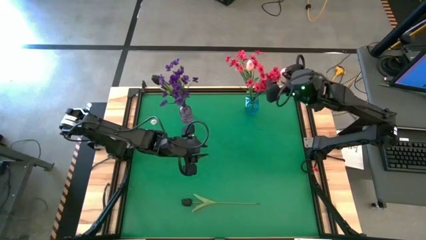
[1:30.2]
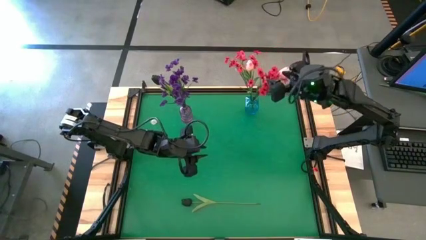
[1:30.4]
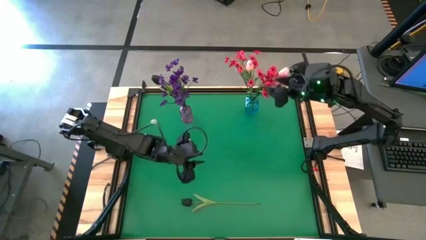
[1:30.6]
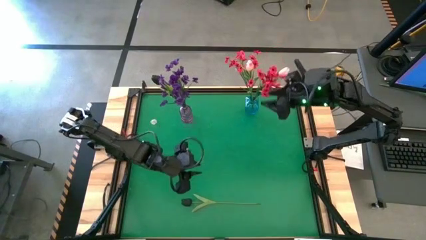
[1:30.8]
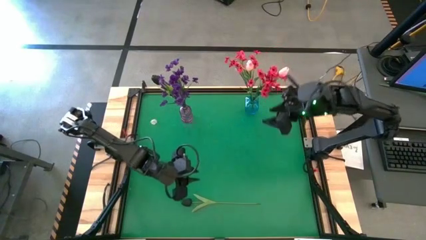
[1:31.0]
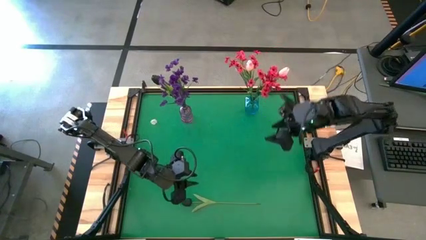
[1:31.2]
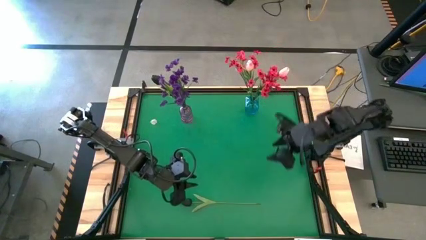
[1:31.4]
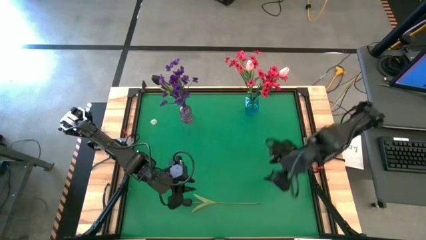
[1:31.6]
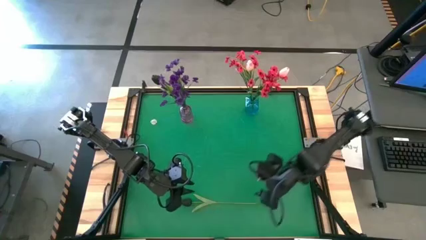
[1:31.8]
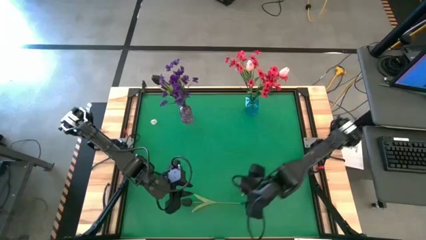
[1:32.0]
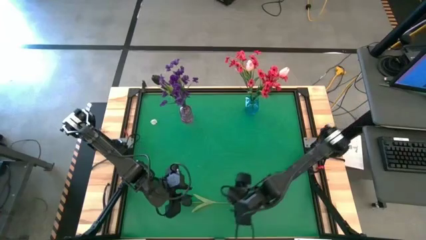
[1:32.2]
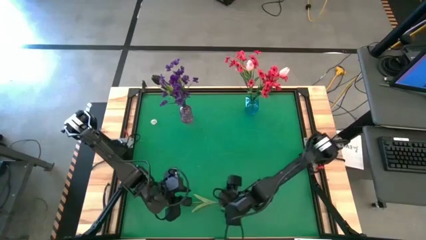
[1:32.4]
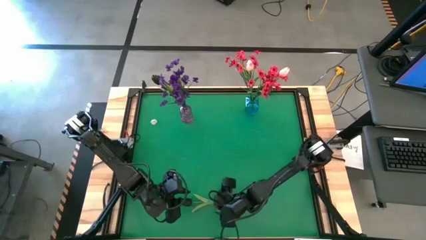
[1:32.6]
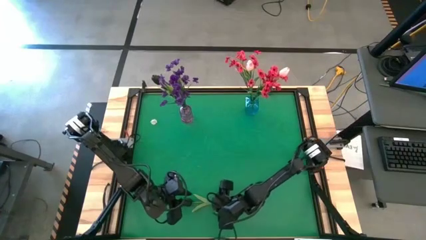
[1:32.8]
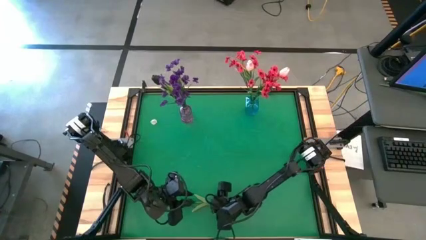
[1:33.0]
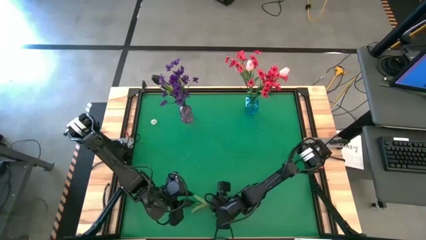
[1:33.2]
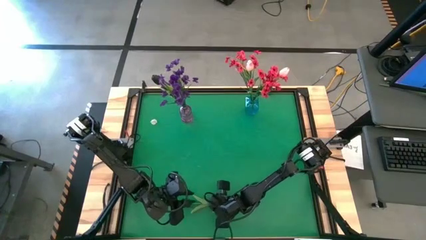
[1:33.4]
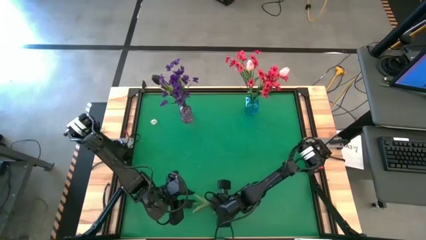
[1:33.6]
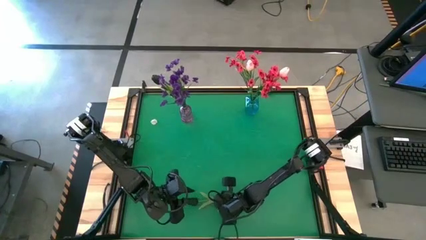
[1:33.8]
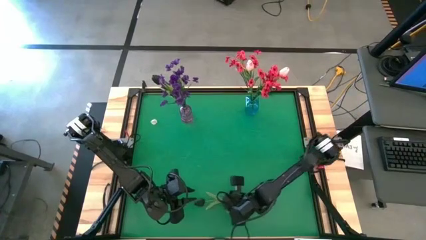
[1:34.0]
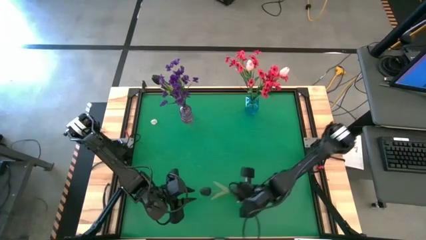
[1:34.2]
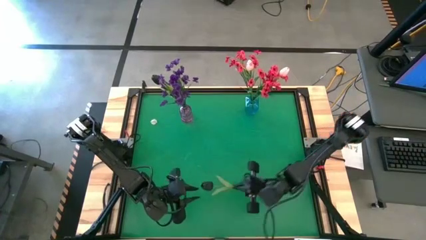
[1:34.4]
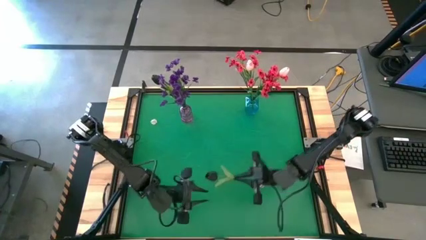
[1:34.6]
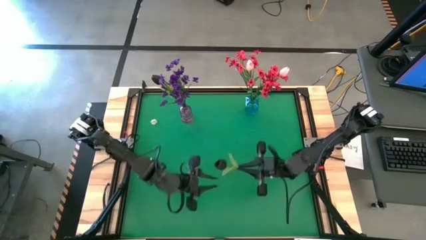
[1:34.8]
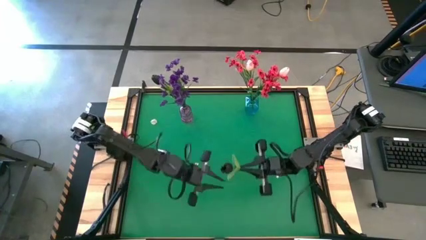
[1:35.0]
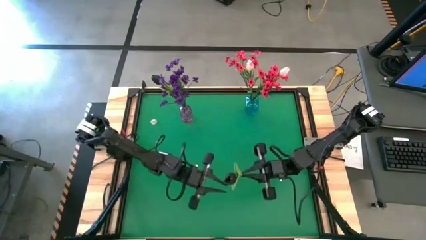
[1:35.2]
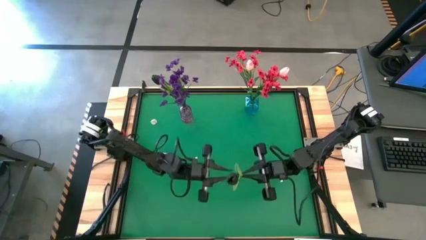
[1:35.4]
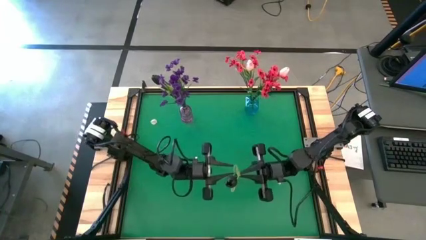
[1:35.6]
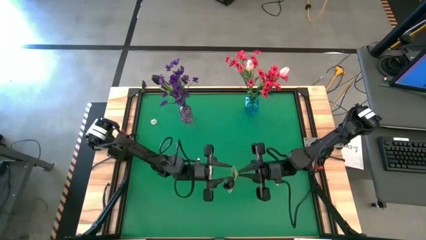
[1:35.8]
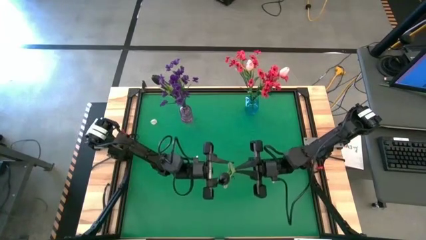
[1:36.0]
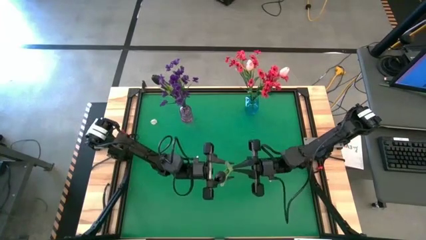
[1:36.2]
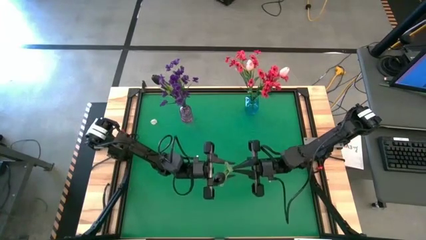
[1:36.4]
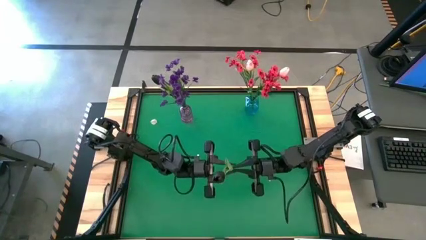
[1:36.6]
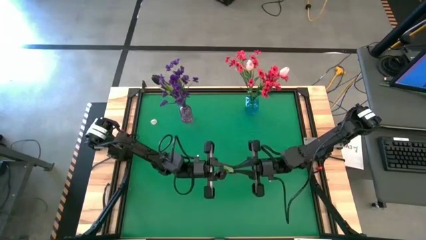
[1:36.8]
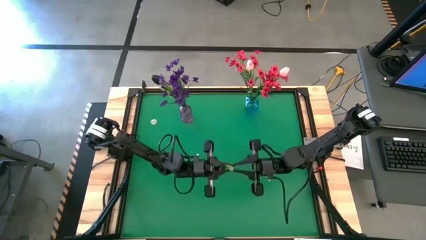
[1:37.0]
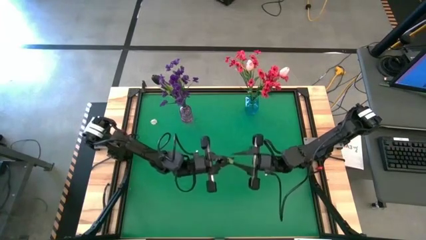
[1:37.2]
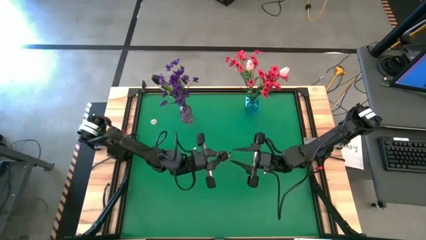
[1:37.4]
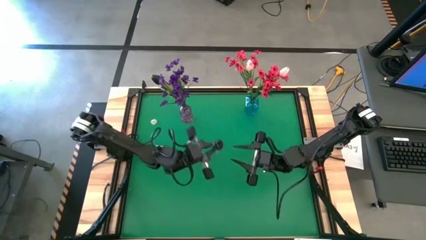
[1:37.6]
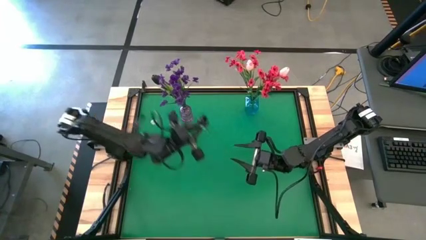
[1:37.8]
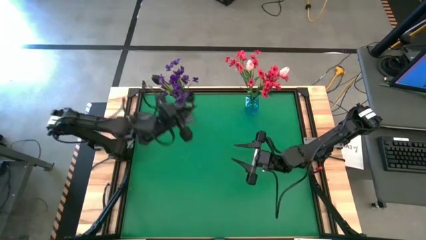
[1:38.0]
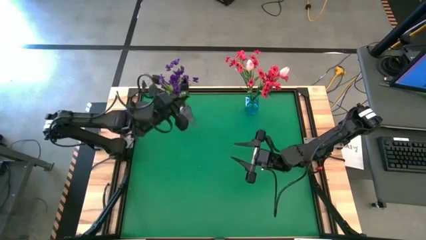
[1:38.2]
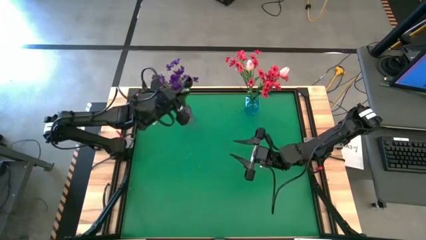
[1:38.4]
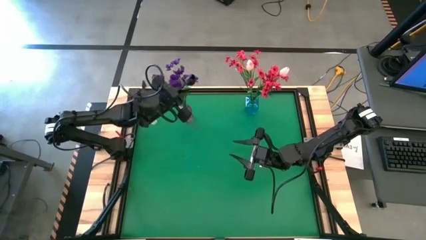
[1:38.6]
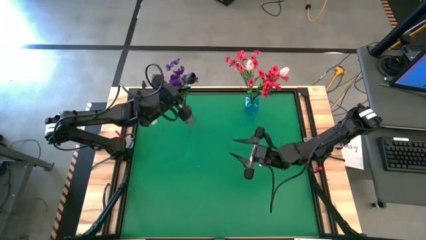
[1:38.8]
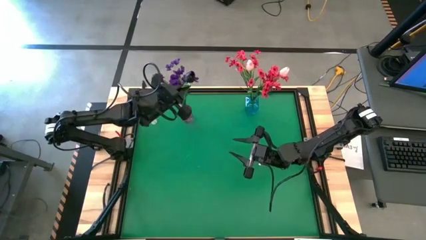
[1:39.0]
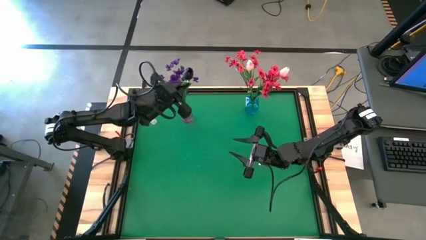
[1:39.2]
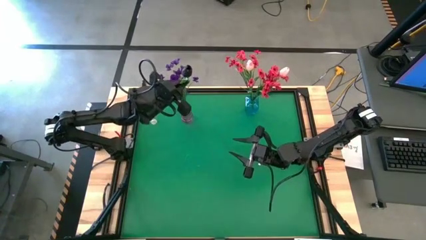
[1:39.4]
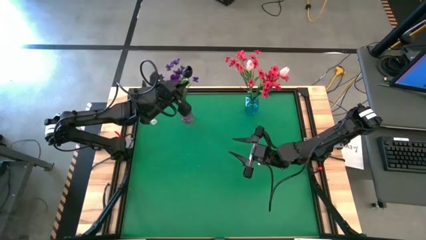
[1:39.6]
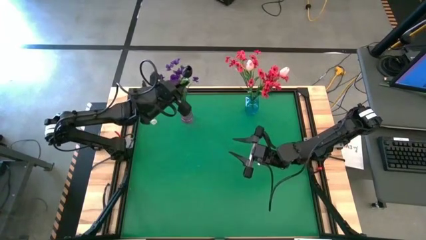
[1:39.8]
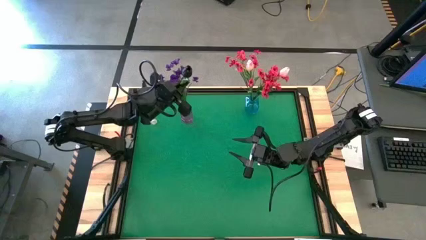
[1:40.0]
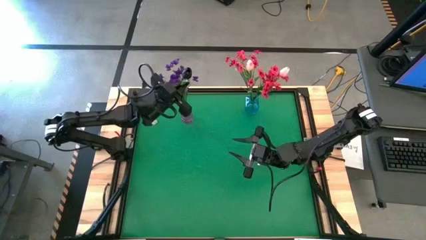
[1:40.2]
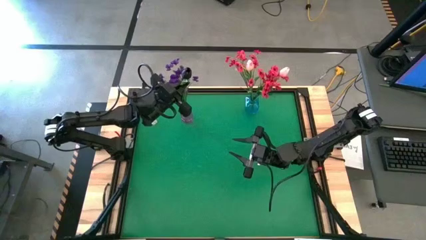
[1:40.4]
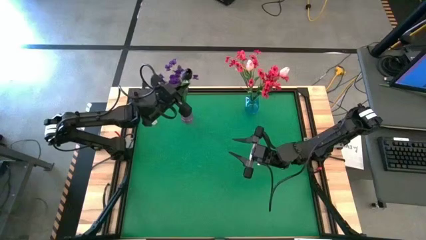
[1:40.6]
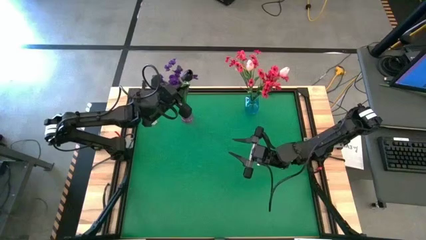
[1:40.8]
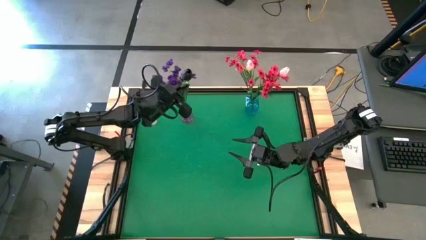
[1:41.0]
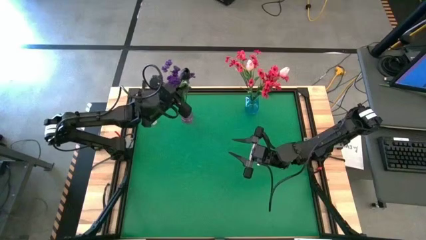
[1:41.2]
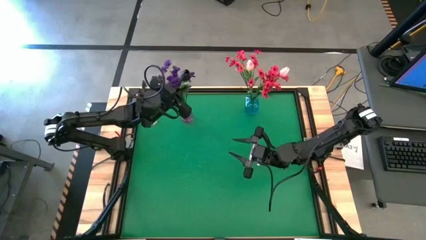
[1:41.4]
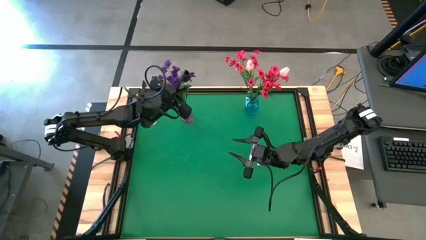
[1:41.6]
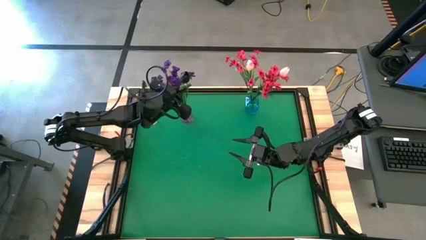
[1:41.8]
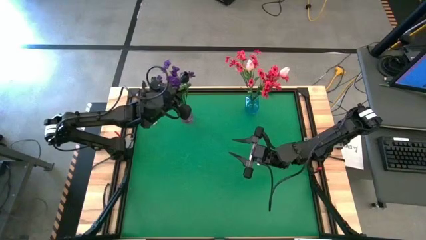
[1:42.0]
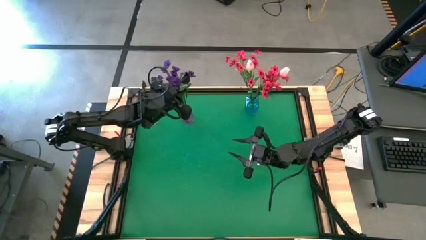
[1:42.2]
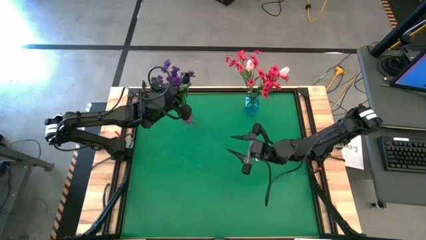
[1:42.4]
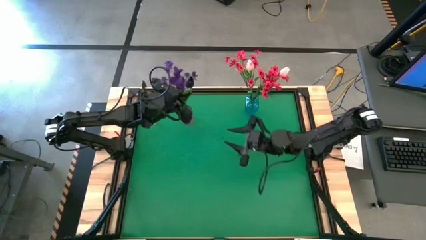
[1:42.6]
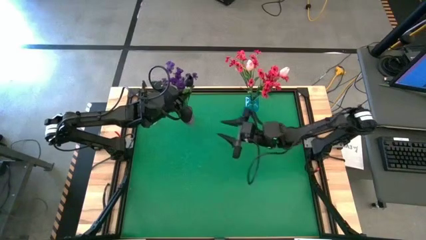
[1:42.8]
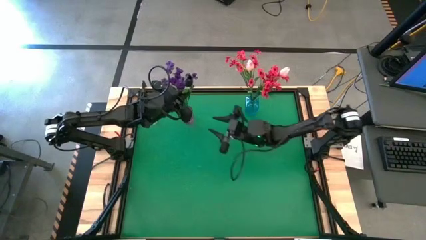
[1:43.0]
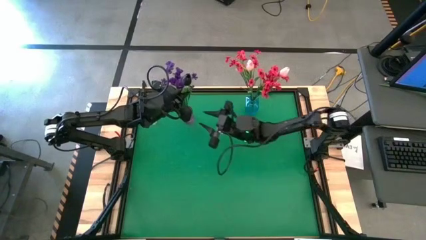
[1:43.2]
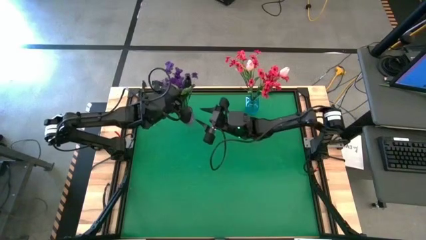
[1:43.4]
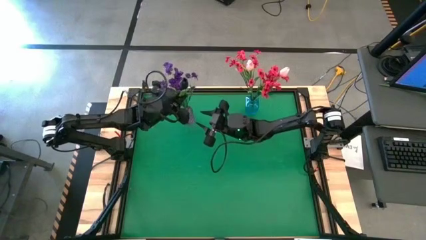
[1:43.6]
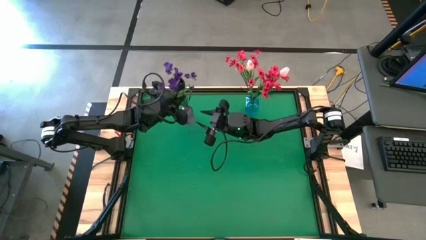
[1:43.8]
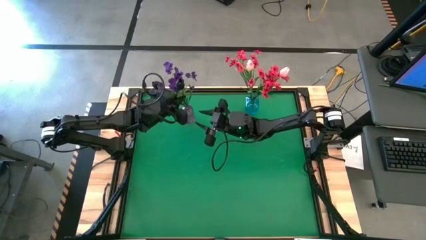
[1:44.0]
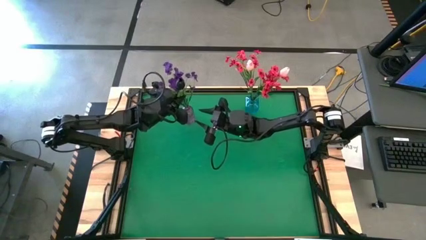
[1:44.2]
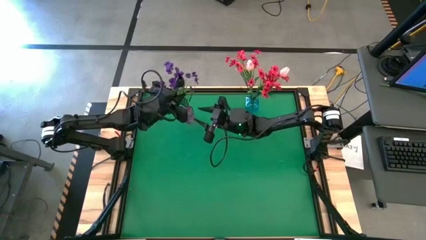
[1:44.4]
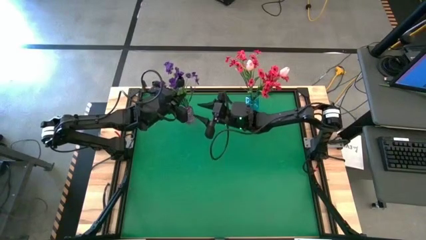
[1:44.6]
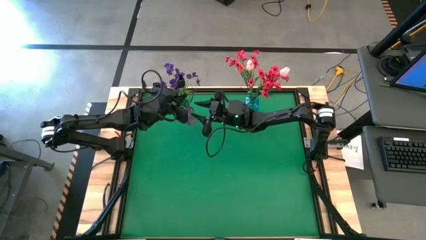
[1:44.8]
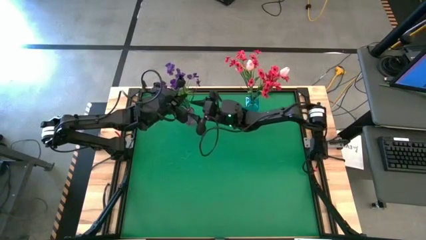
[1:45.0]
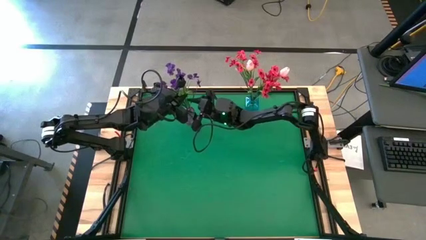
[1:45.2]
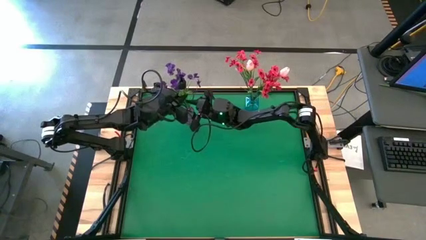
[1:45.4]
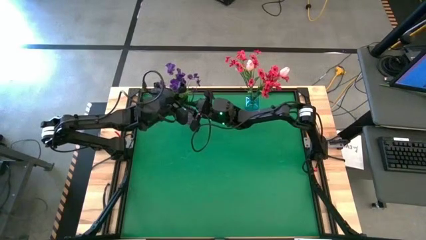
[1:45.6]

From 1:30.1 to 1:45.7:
Task: Sort flowers into vase by color
Put the black flower into the violet vase

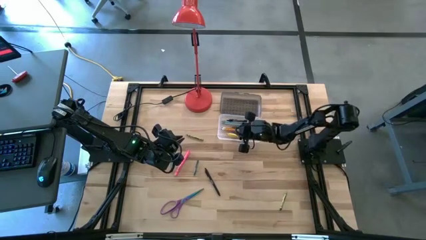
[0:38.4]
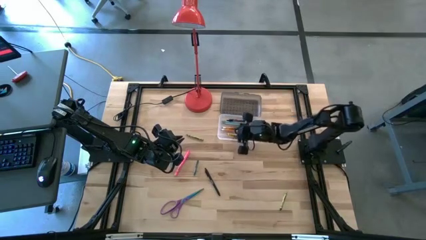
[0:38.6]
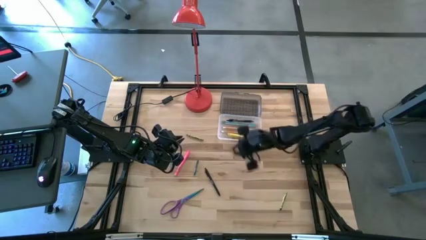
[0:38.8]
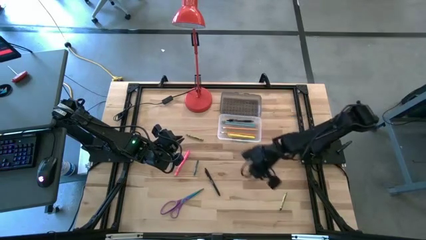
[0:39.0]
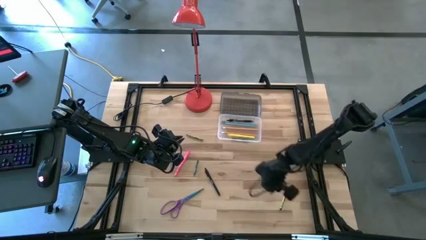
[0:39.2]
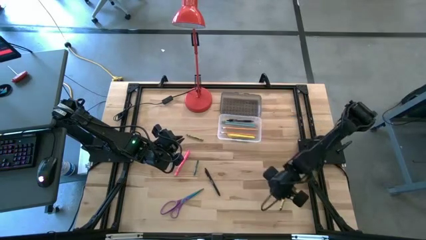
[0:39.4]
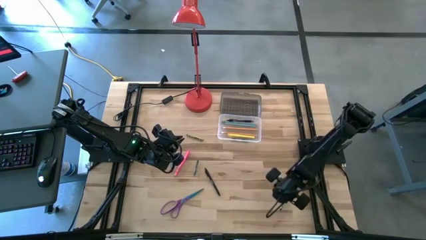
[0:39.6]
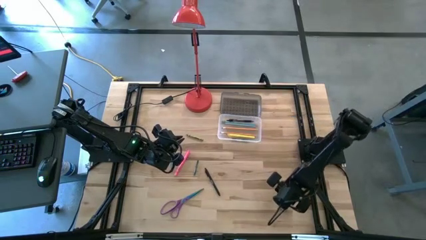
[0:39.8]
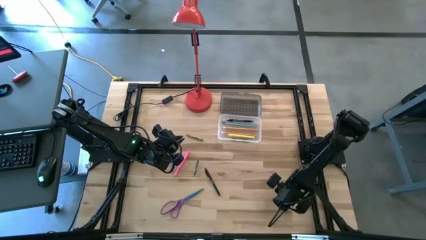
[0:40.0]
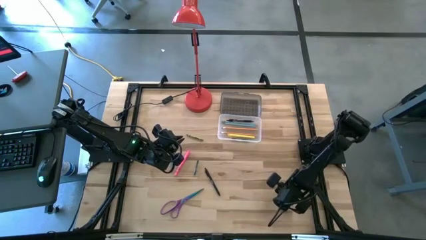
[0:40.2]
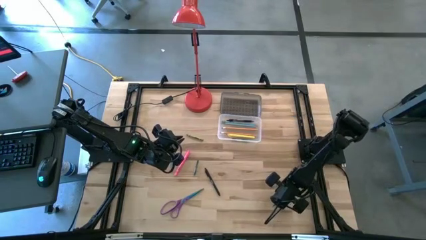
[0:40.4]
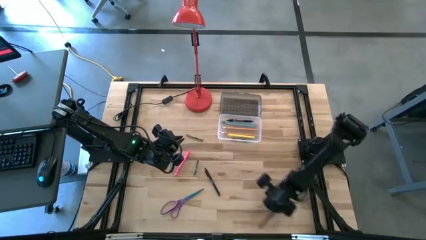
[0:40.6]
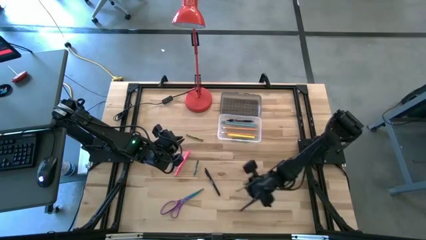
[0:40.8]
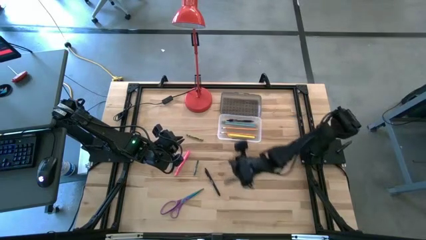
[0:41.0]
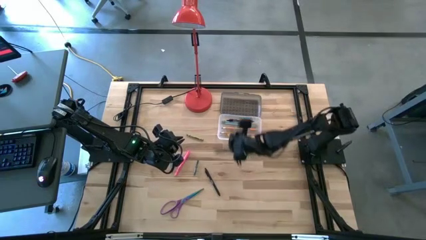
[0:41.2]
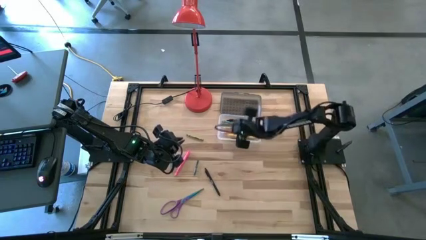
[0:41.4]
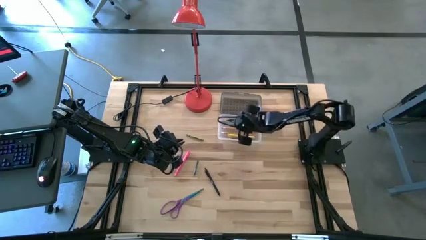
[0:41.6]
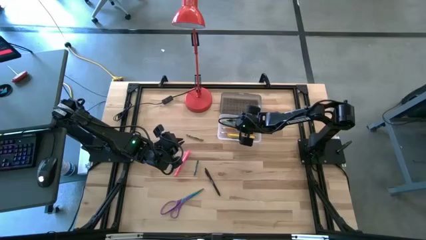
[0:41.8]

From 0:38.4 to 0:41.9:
Task: Pick & place school supplies into a supply box
Put the bottom green crayon into the black supply box
